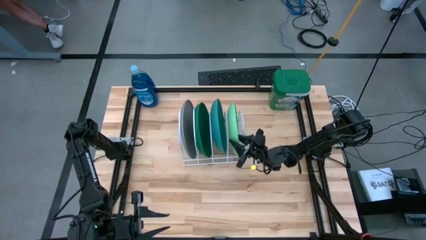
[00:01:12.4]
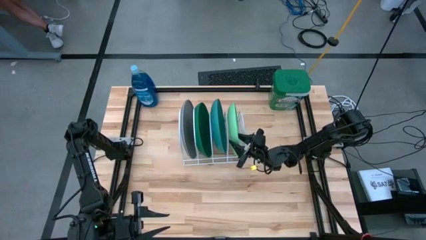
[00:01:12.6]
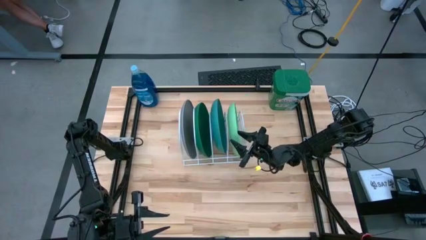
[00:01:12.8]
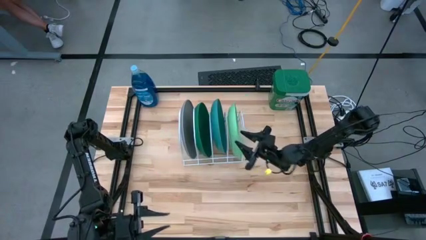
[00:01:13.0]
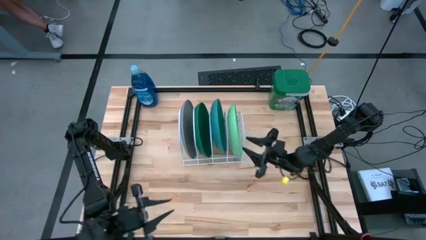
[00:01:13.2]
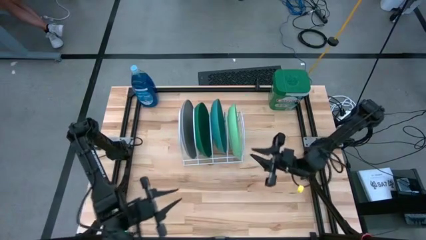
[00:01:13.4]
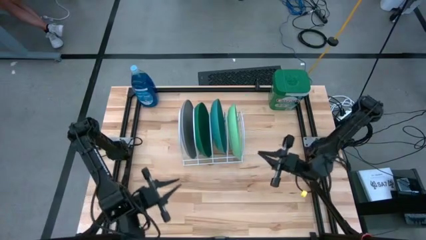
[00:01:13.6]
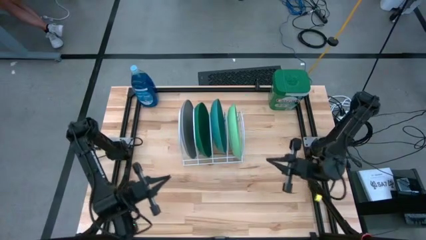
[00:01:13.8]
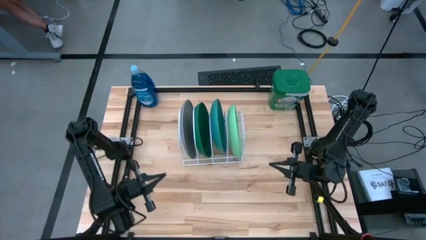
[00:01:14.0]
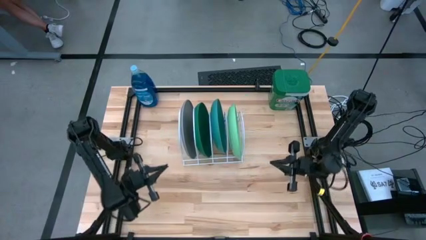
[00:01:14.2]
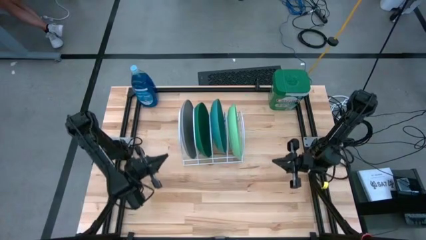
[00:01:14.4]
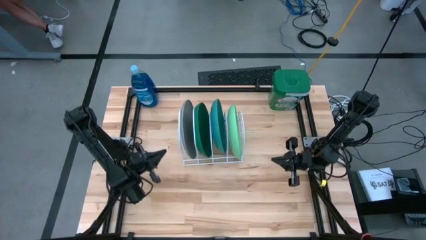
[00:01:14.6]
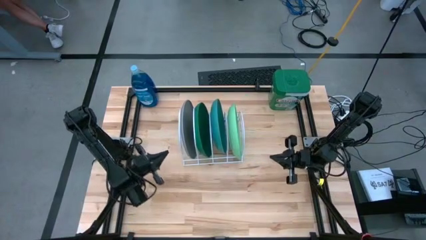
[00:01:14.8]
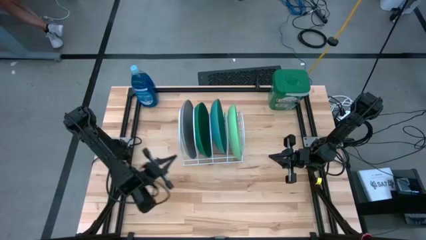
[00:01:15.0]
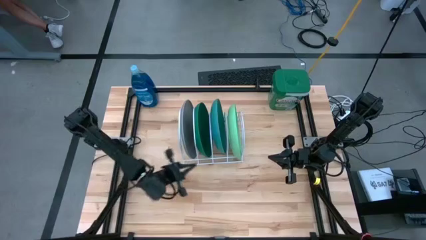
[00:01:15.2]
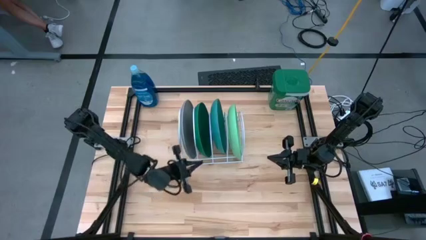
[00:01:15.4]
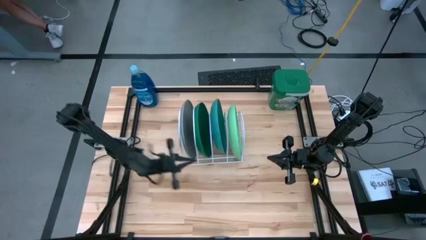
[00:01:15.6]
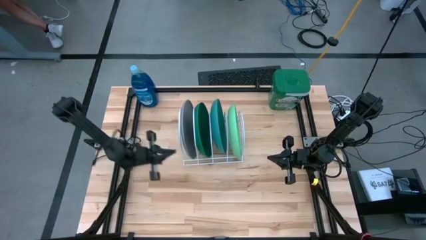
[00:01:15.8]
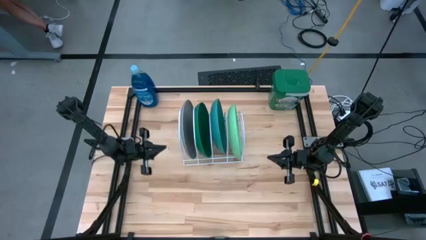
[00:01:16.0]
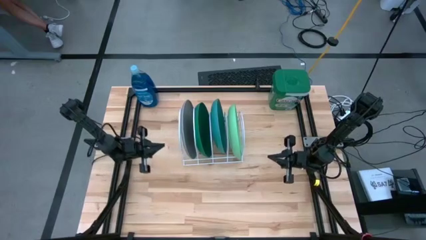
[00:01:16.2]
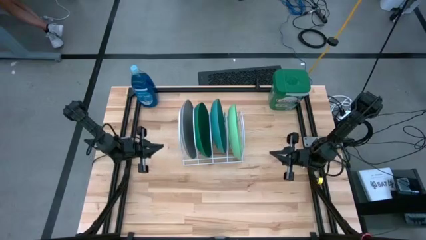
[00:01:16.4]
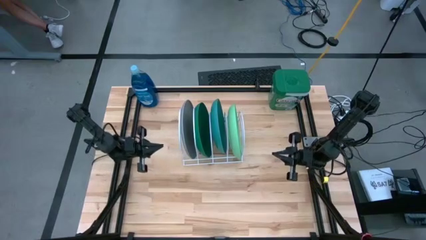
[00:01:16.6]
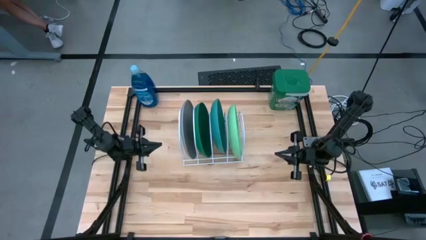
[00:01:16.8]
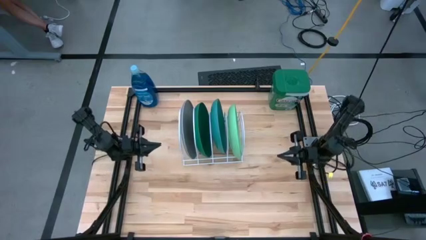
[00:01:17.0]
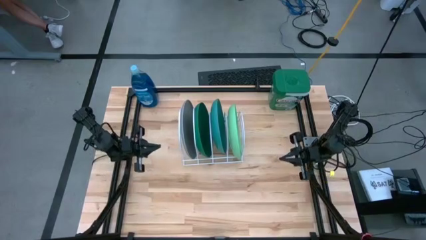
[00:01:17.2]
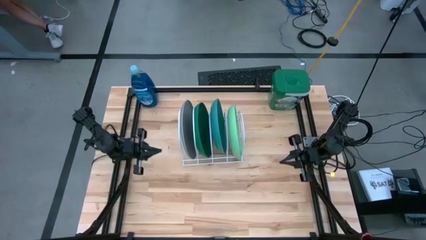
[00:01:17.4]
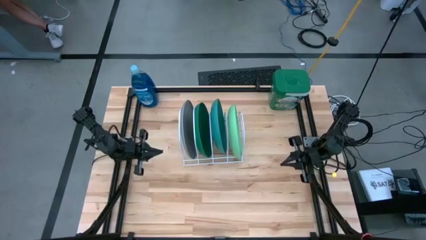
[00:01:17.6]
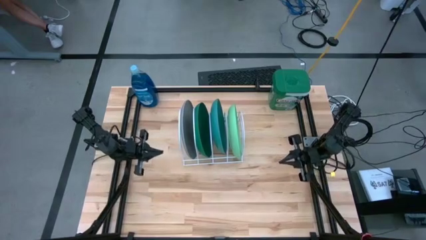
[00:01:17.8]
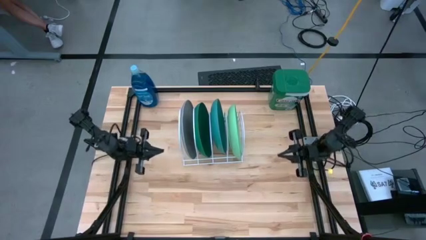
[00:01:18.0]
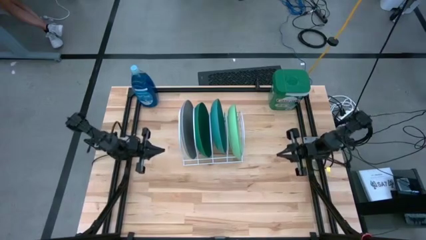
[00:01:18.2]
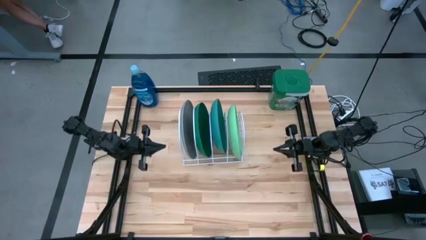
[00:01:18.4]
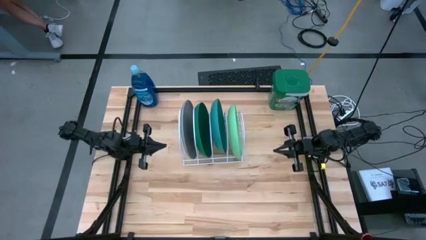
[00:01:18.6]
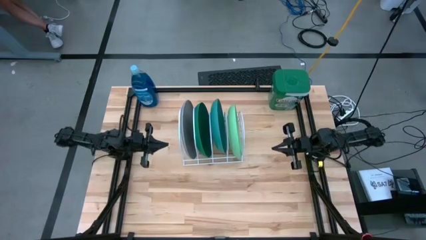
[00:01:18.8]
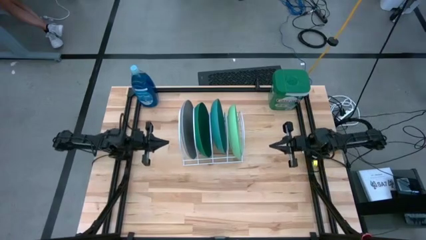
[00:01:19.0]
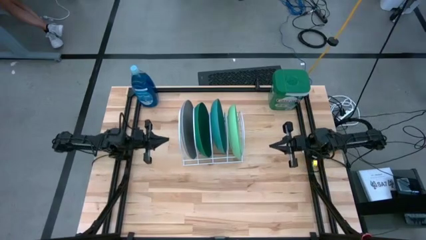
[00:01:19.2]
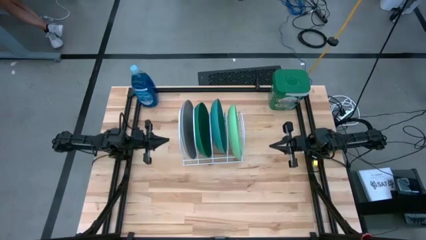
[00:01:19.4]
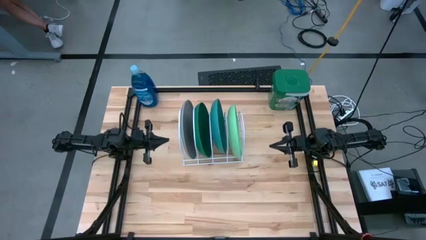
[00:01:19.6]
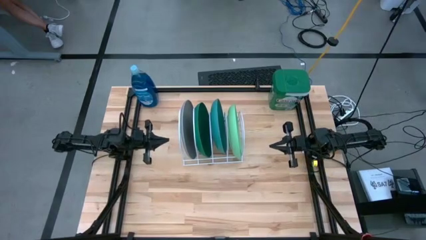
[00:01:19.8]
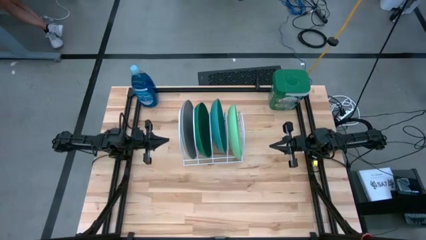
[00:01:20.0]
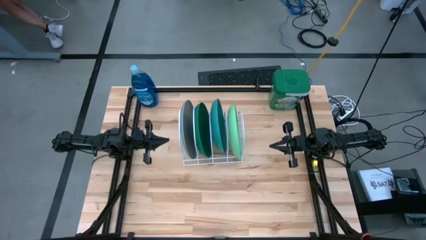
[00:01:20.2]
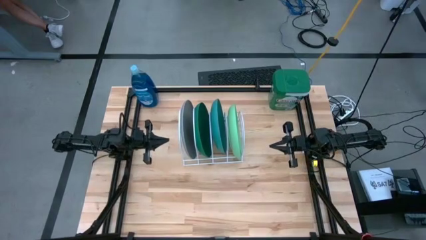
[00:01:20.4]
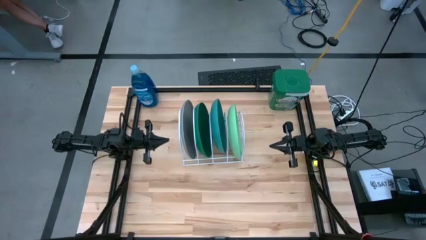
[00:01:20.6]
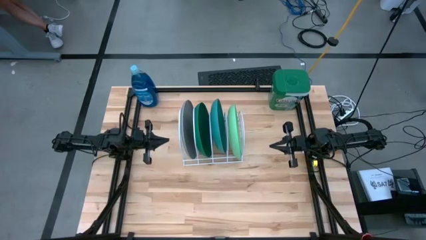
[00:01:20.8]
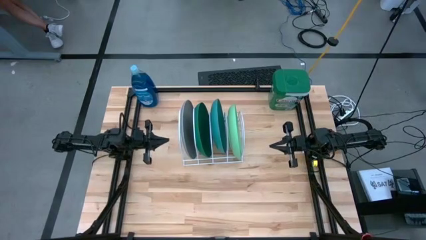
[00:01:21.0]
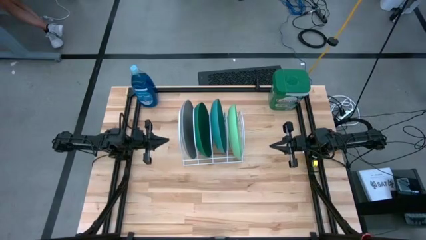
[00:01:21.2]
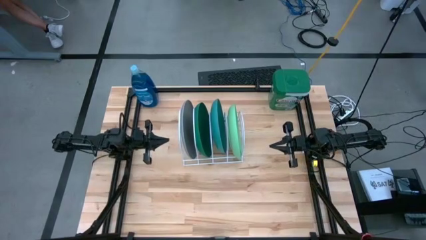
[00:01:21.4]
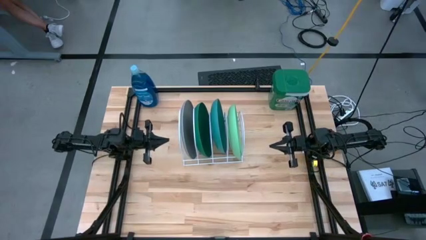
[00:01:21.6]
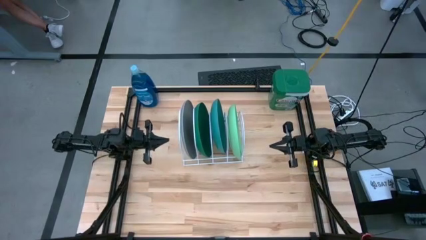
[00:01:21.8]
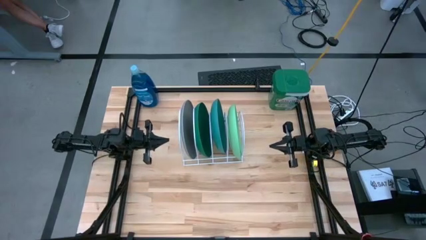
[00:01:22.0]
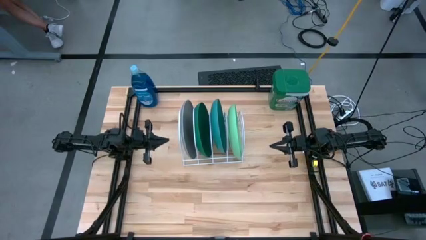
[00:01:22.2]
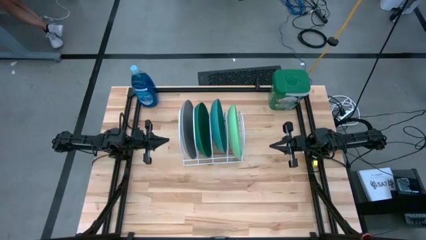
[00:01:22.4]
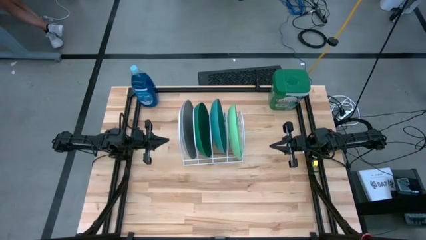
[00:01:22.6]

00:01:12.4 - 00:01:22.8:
Task: Sort dishes
Return to Home Position
